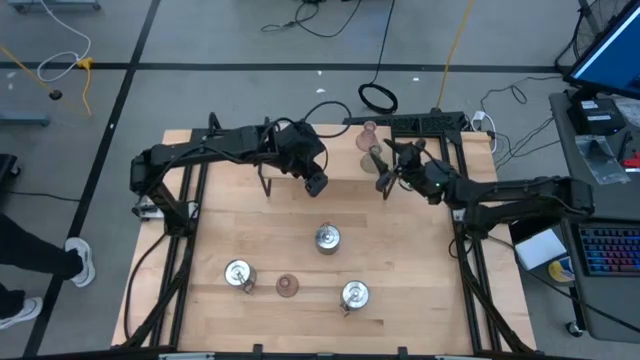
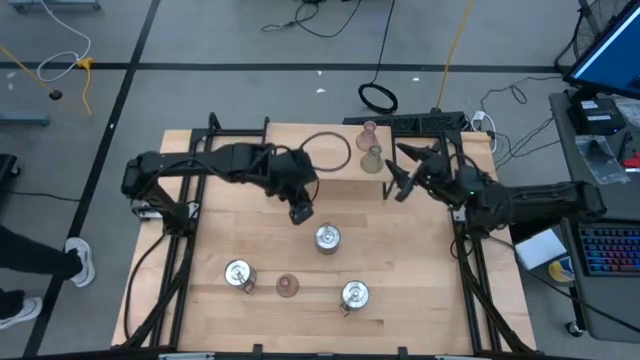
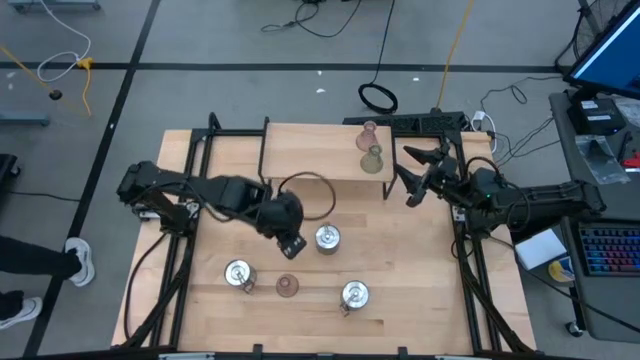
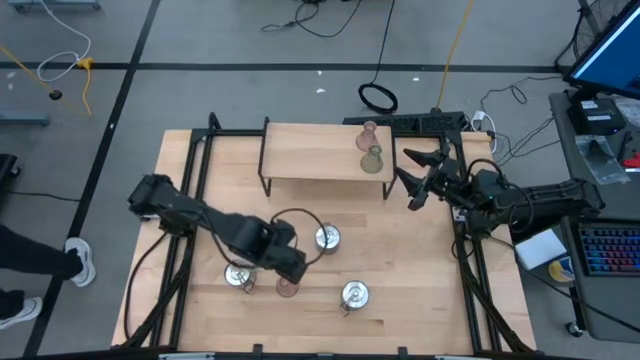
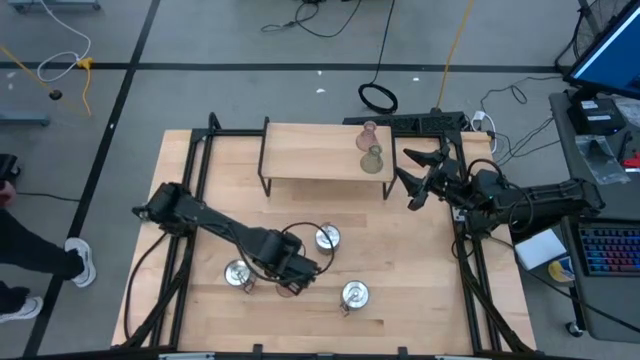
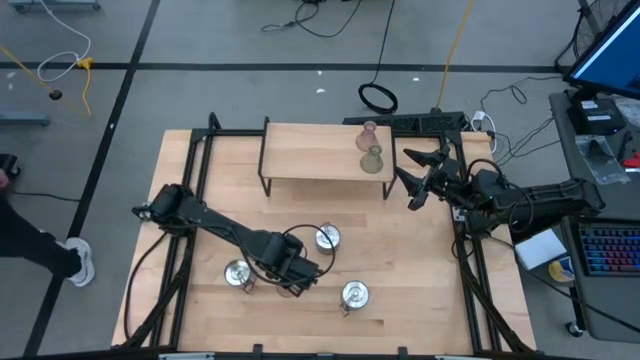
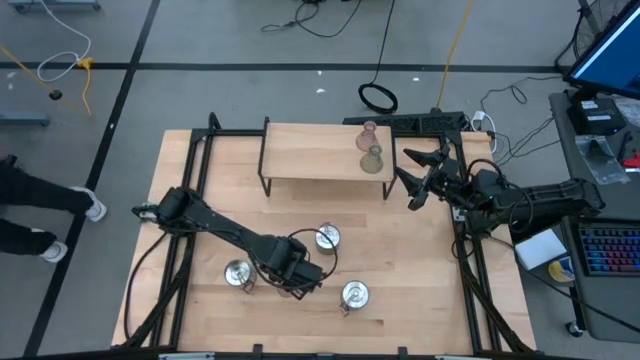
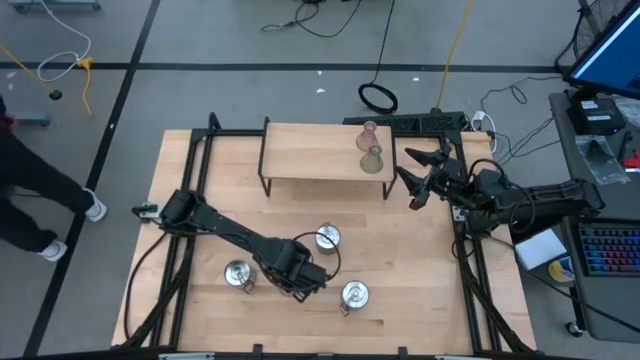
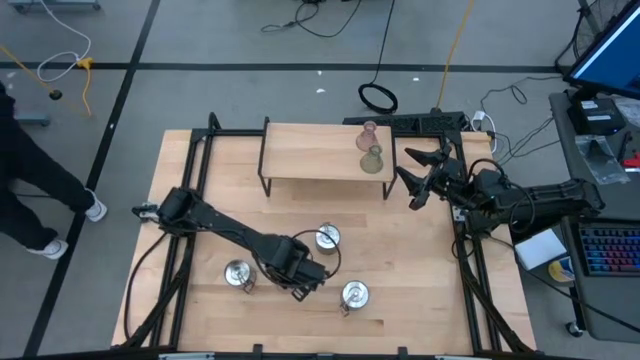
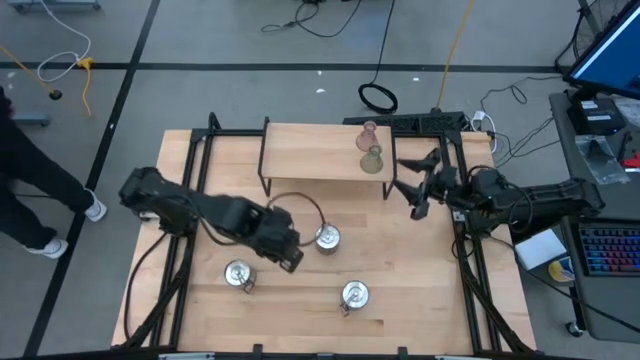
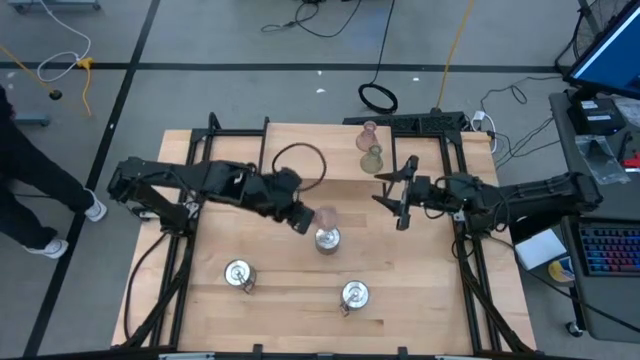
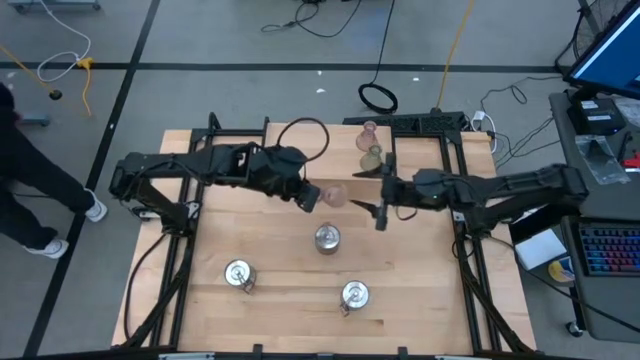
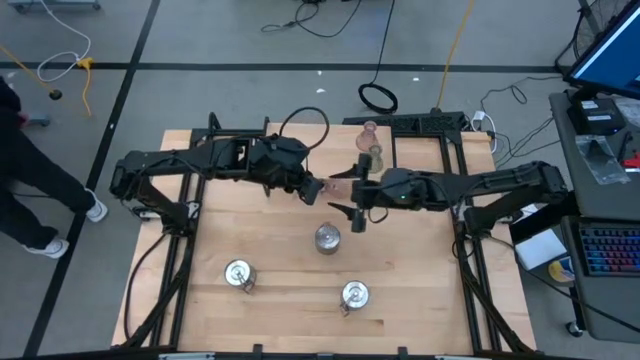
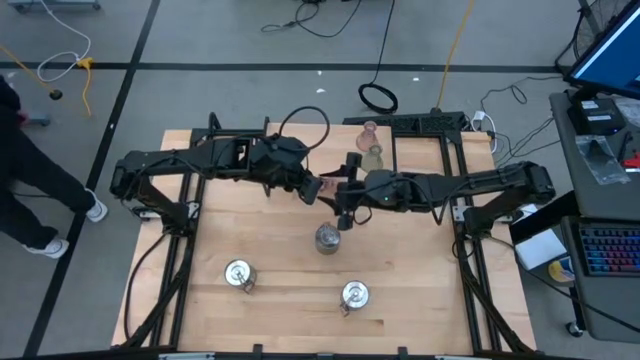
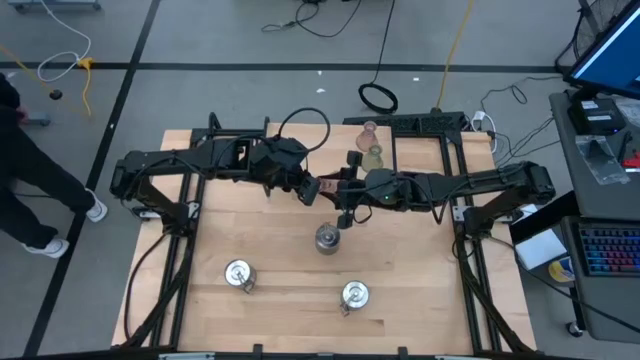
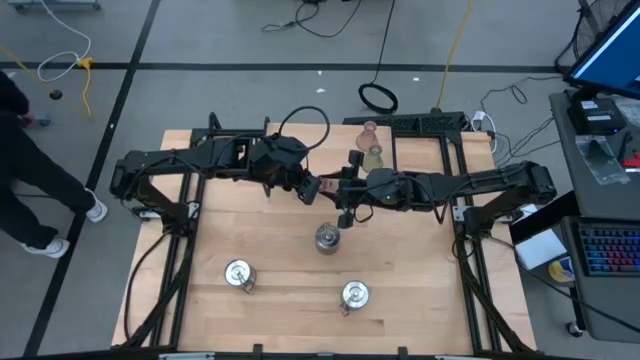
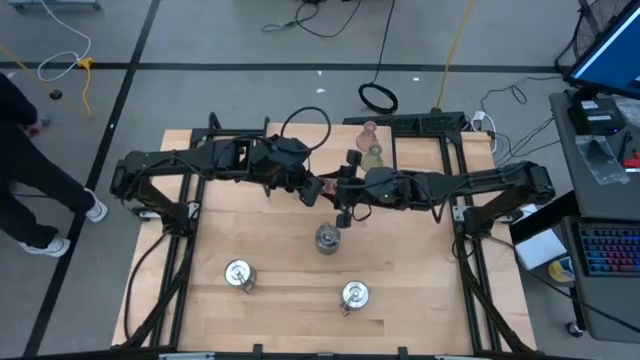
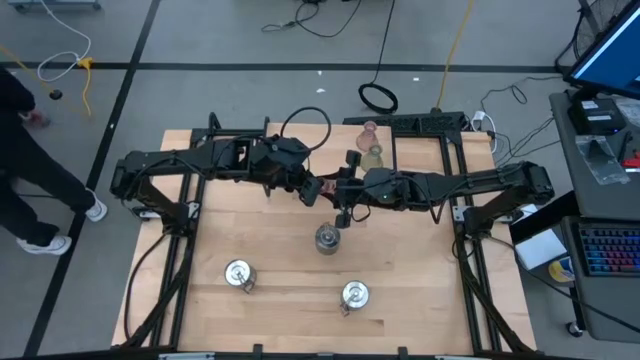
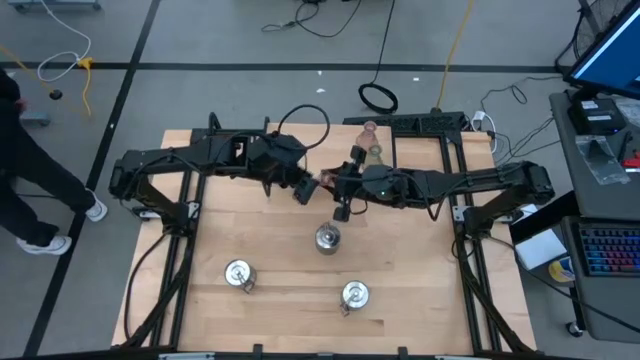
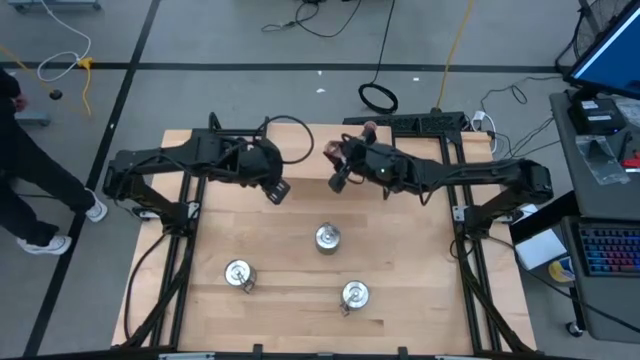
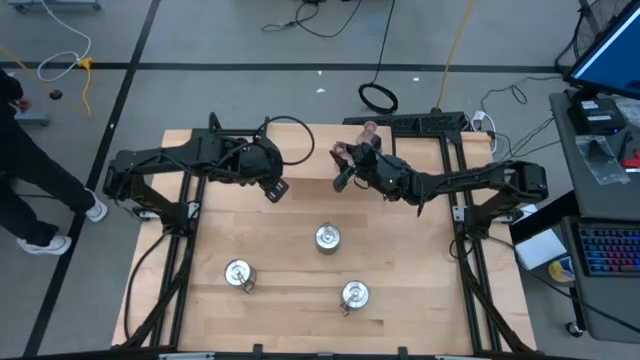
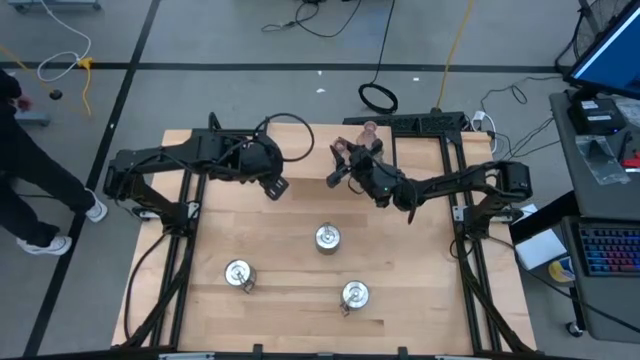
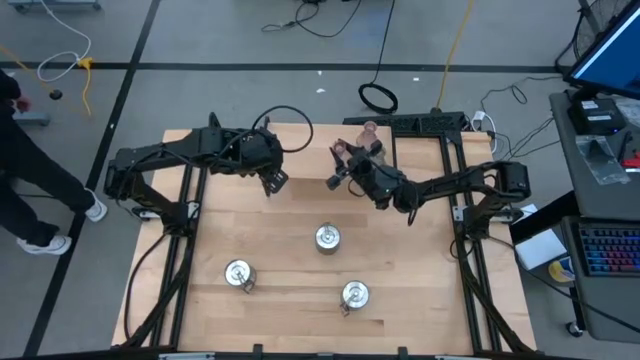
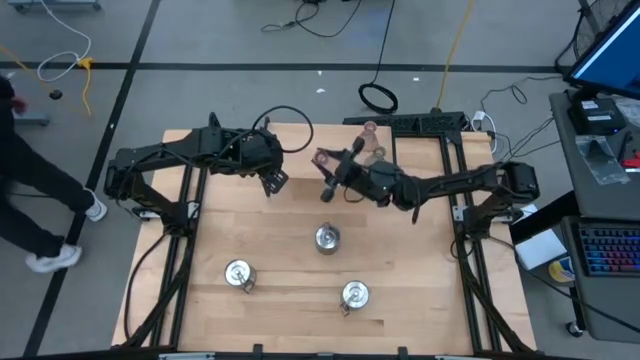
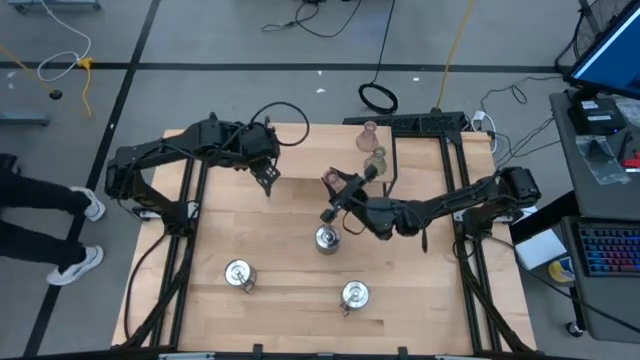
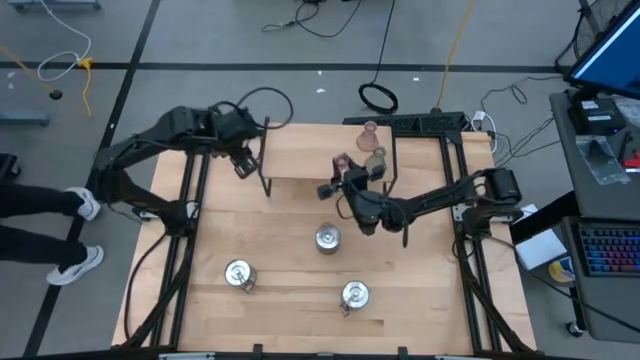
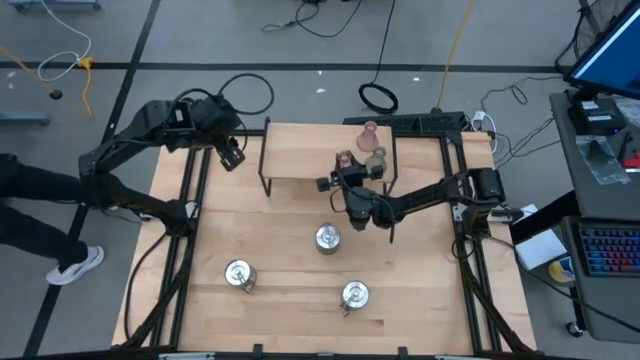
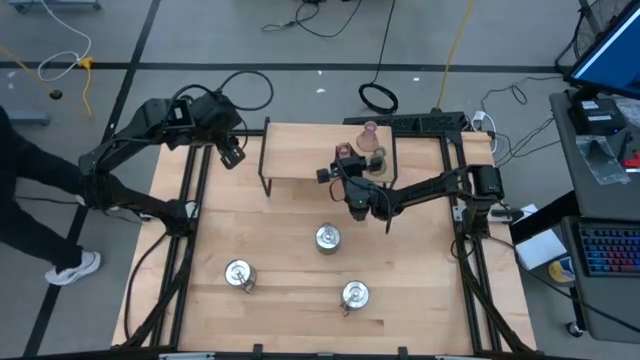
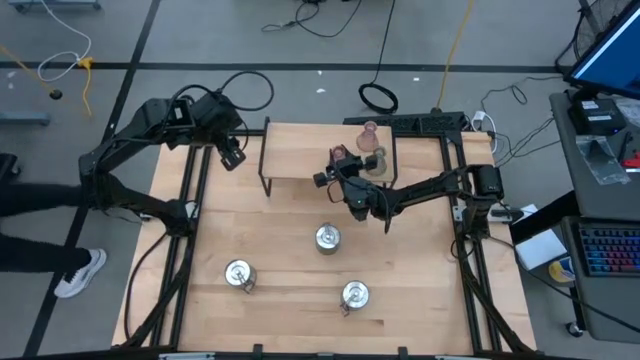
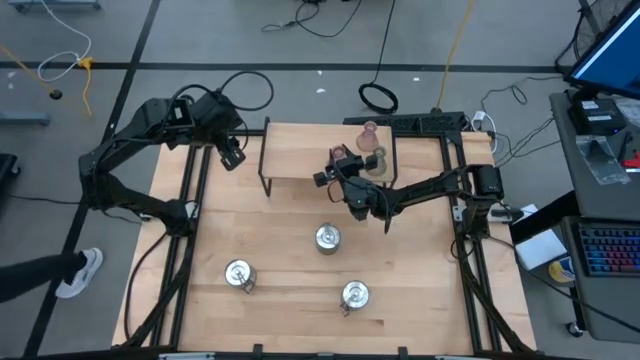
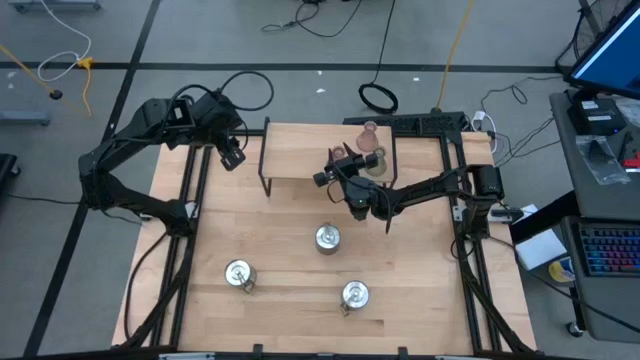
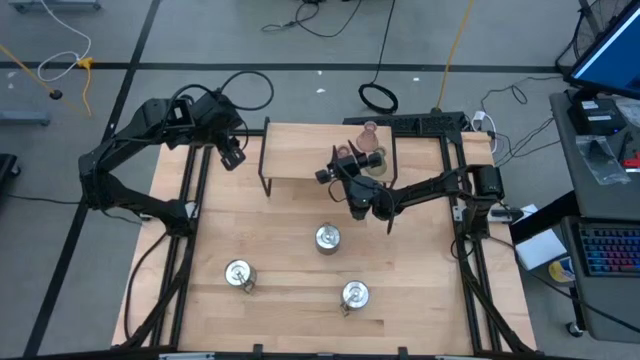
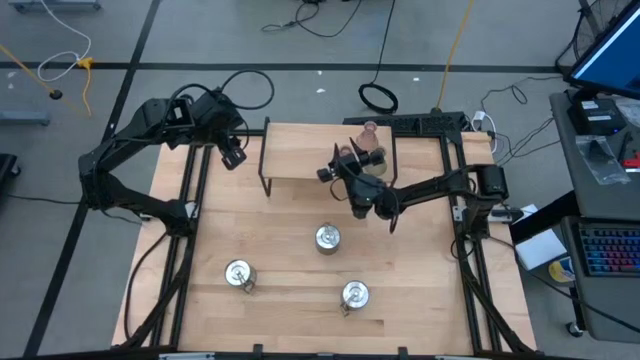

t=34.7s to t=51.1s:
Task: Pick & Place candle stick holders
Put the pink candle holder on the shelf

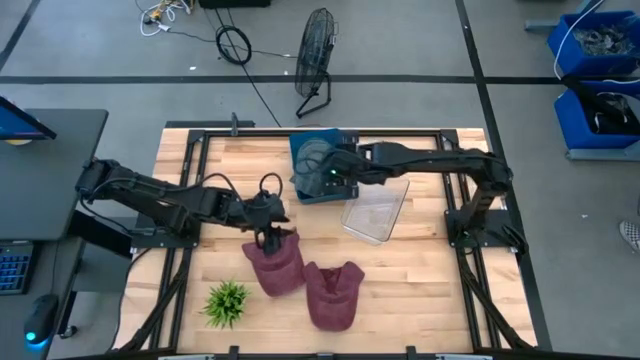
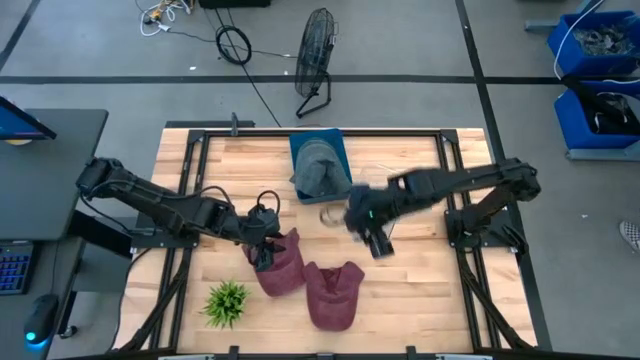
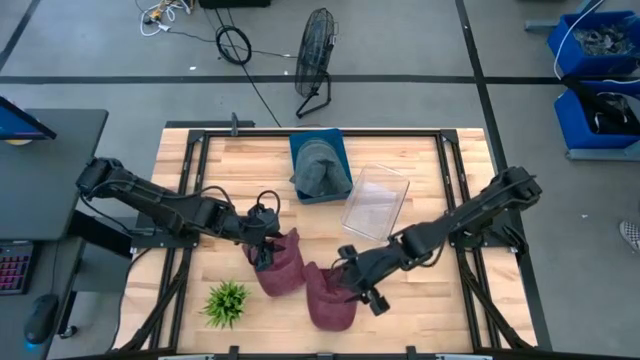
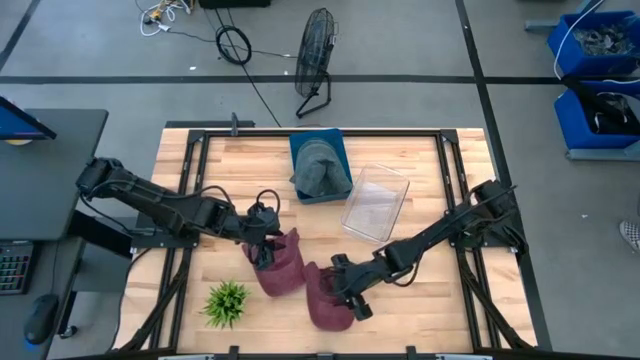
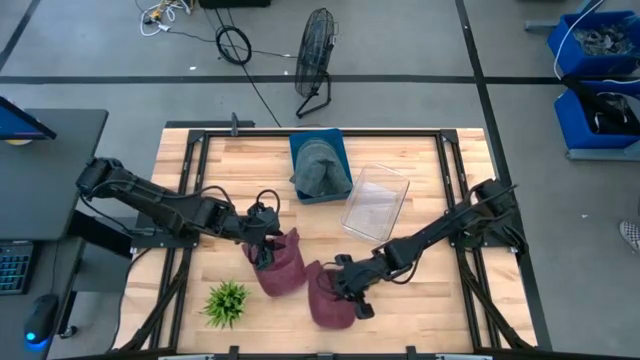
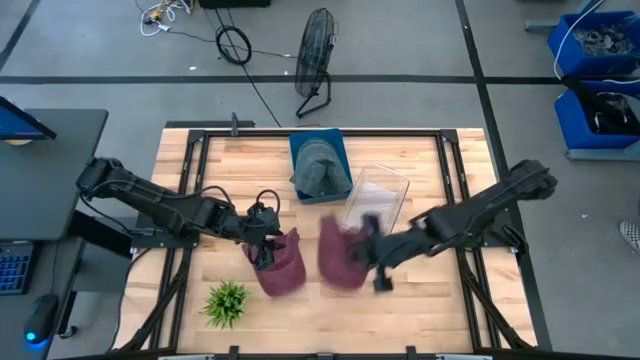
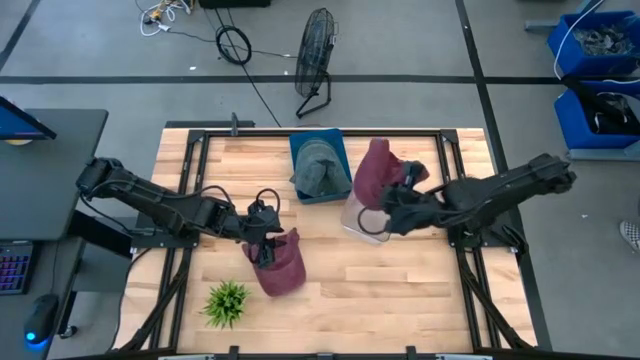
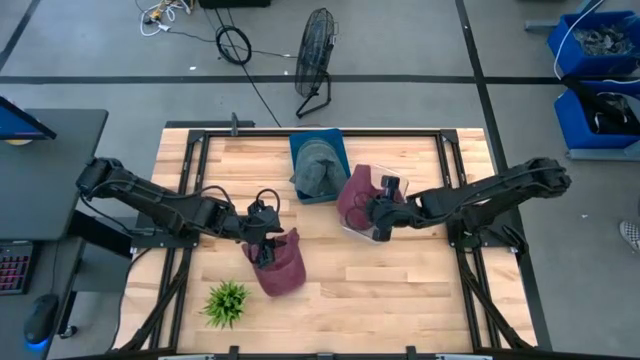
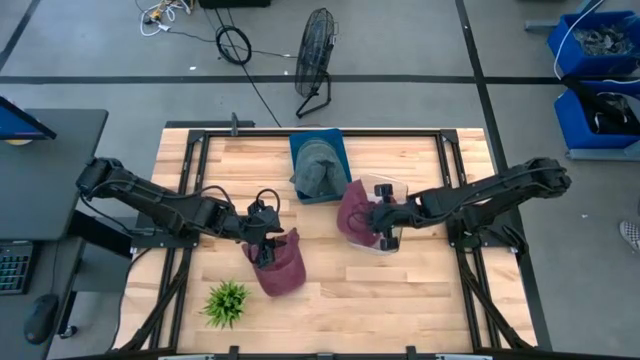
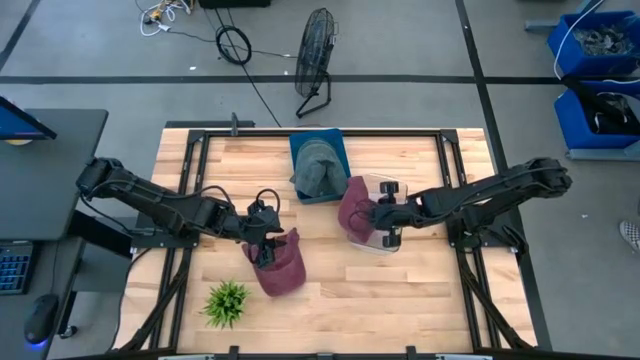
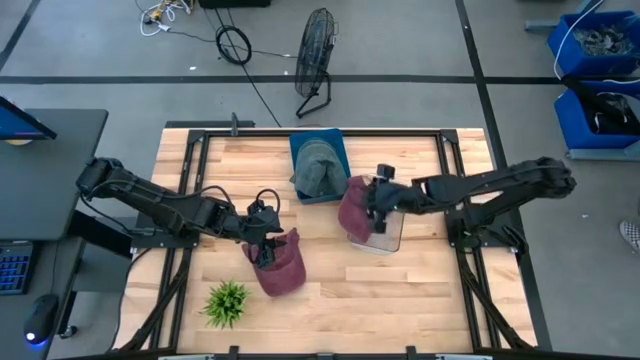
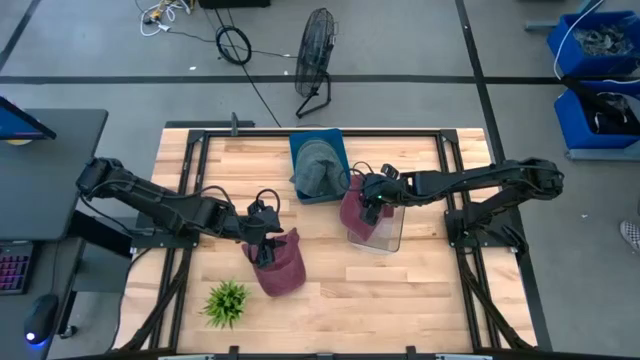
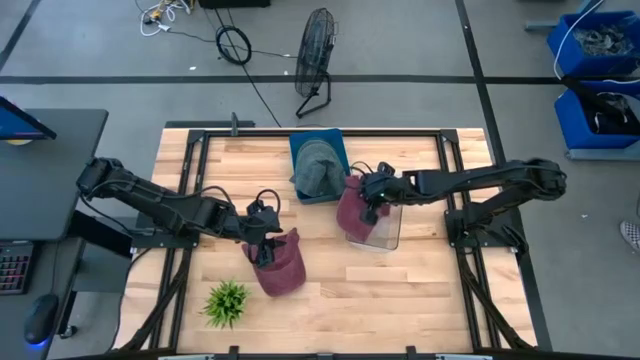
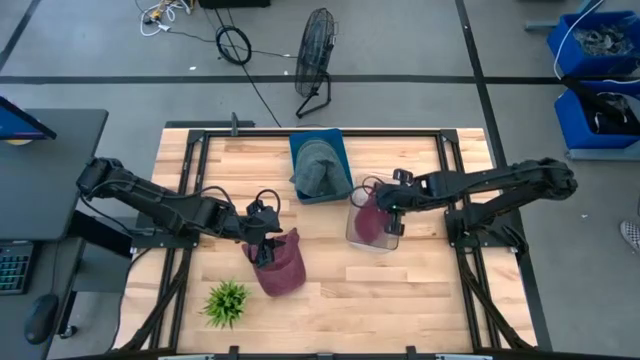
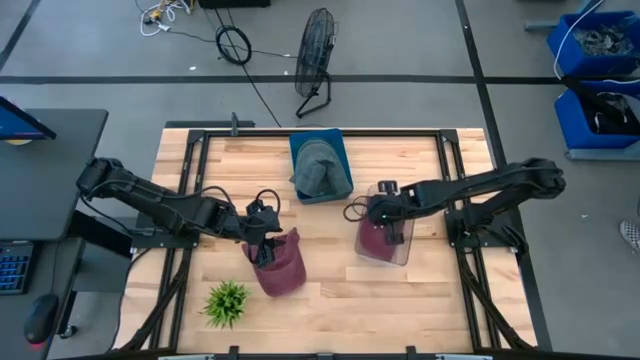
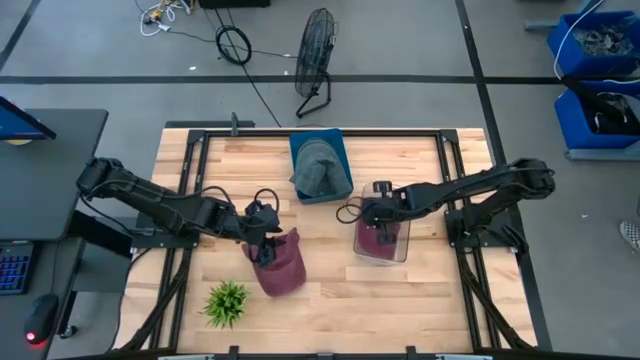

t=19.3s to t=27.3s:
Task: Pick & Place hat
Put the red cap into the transparent bin
